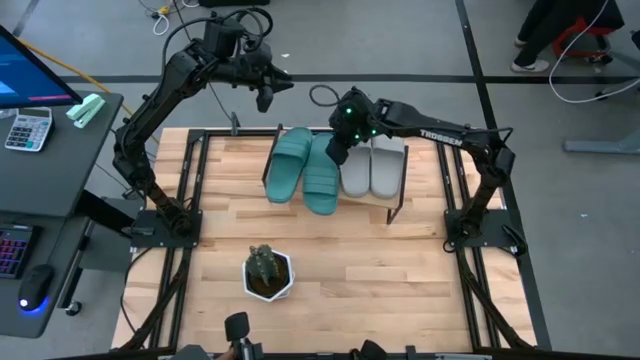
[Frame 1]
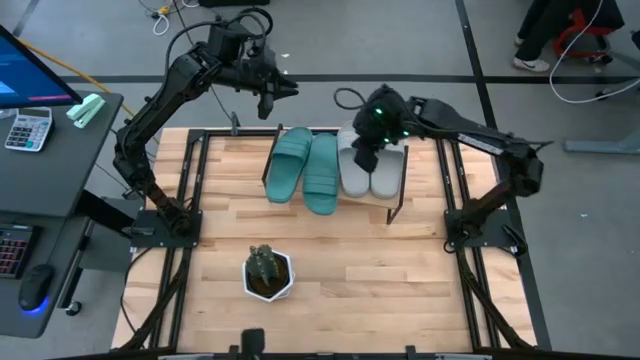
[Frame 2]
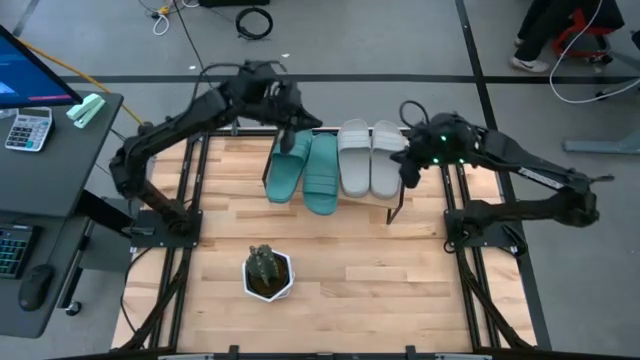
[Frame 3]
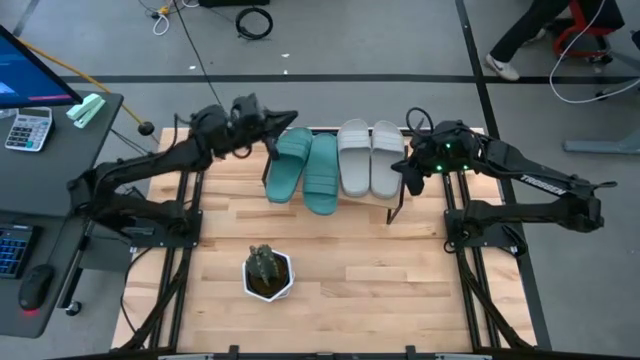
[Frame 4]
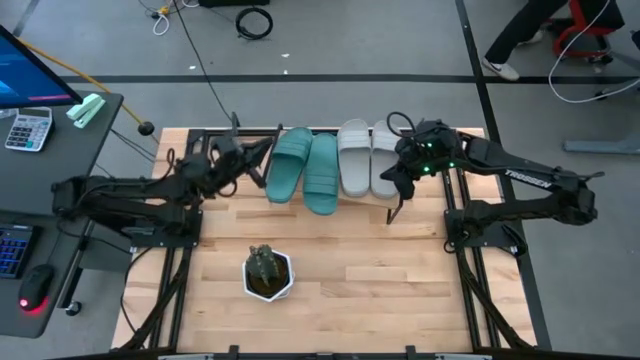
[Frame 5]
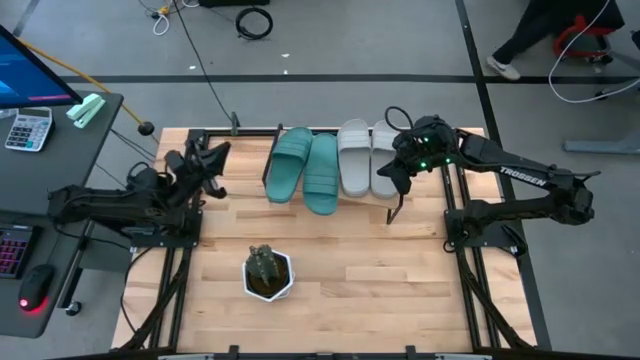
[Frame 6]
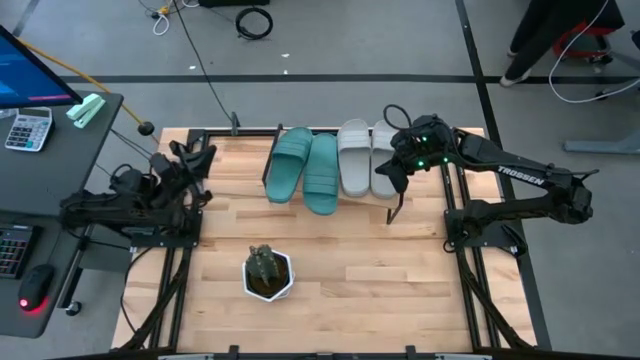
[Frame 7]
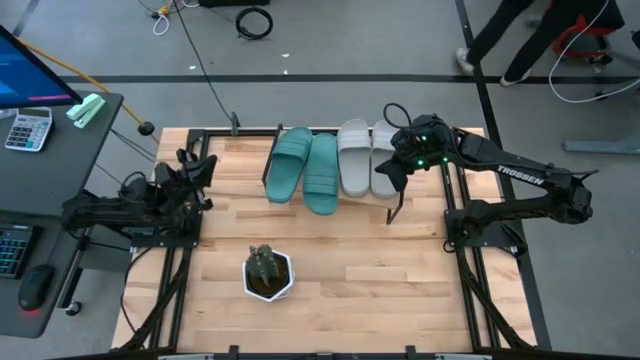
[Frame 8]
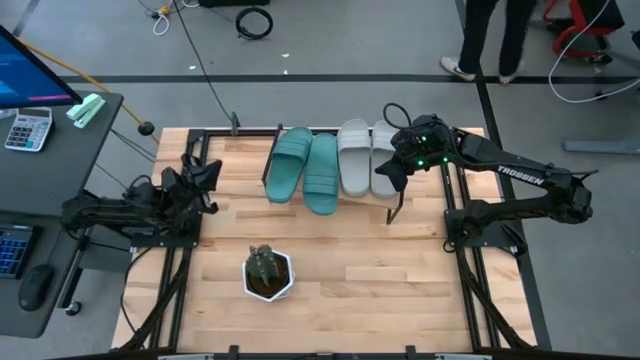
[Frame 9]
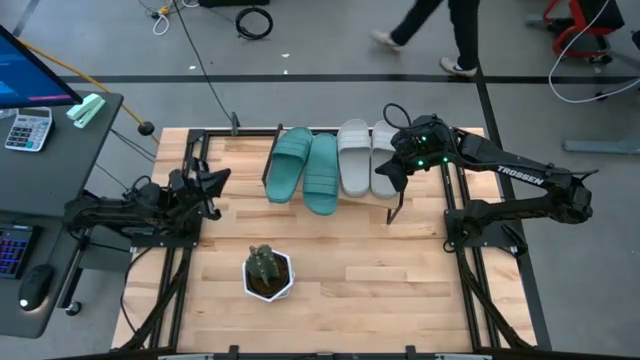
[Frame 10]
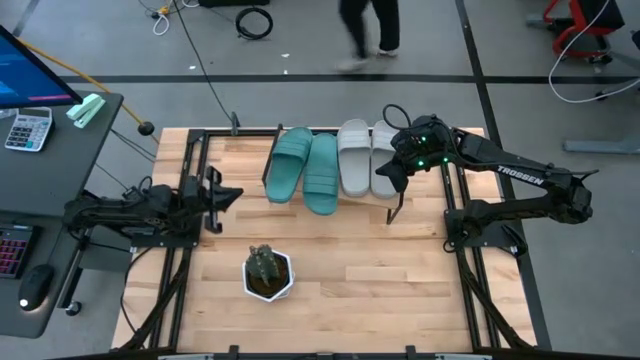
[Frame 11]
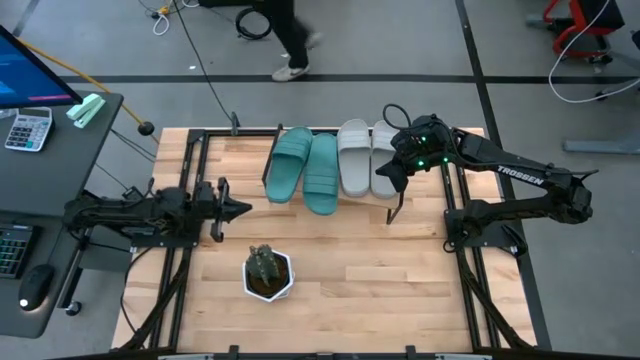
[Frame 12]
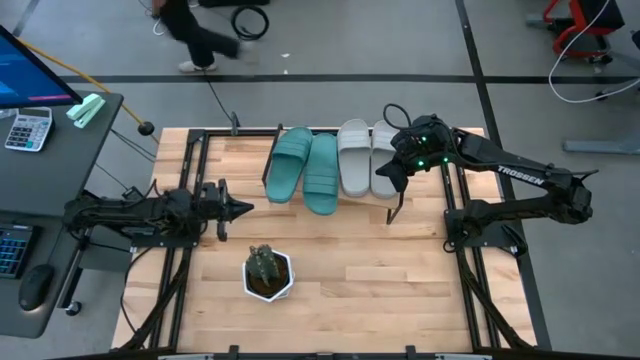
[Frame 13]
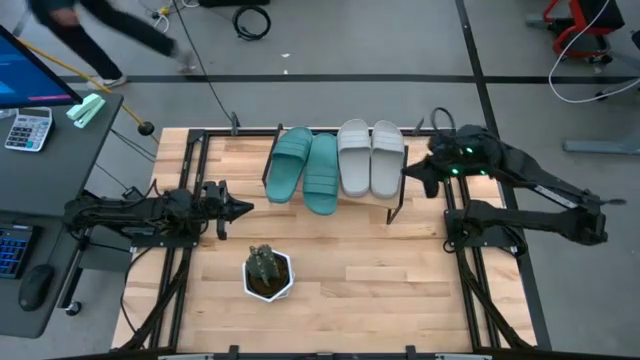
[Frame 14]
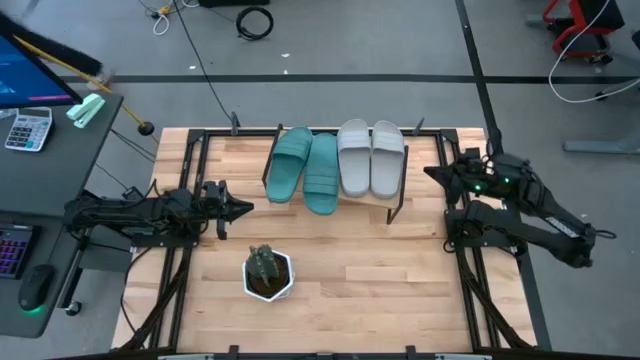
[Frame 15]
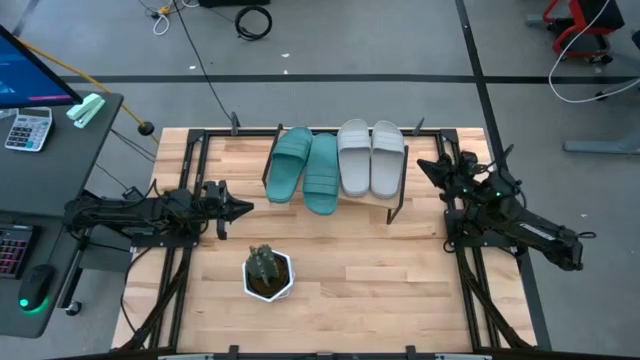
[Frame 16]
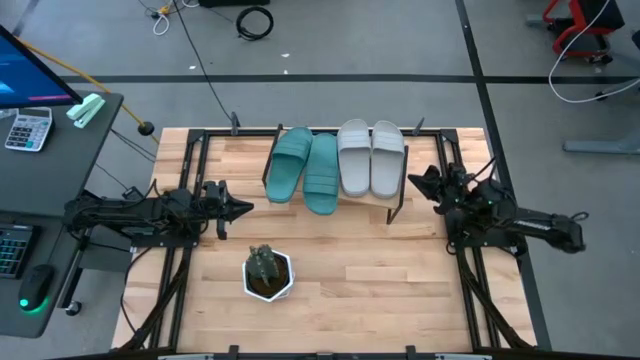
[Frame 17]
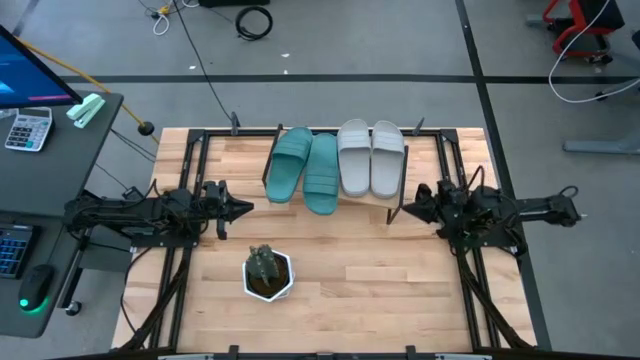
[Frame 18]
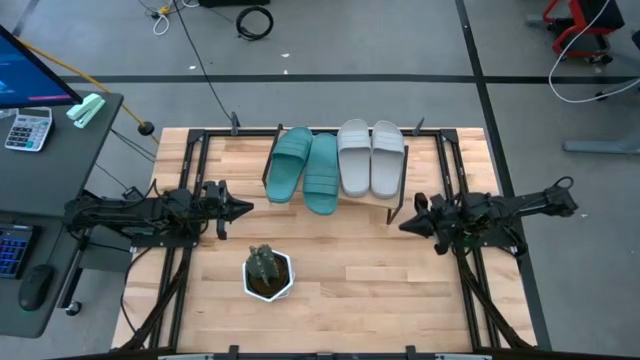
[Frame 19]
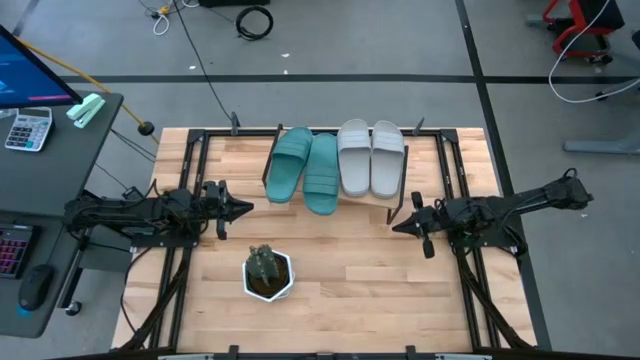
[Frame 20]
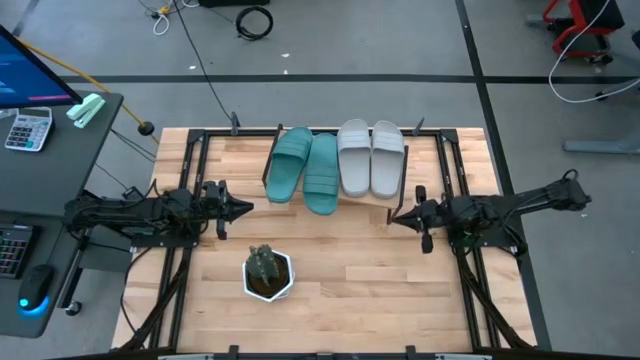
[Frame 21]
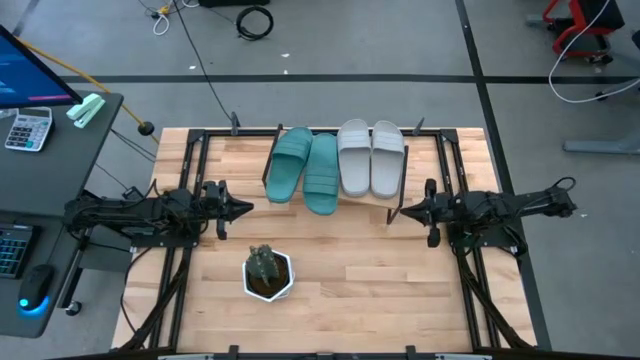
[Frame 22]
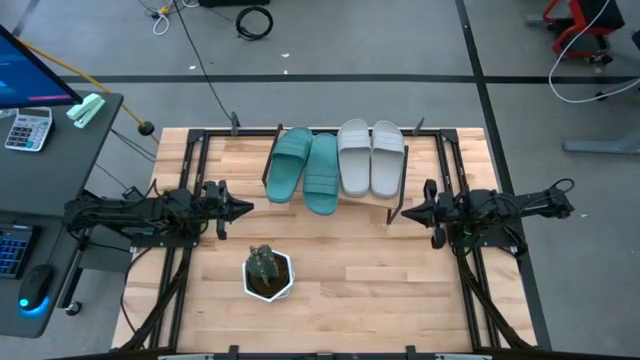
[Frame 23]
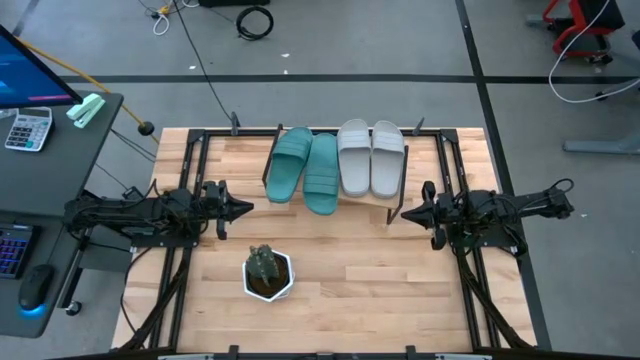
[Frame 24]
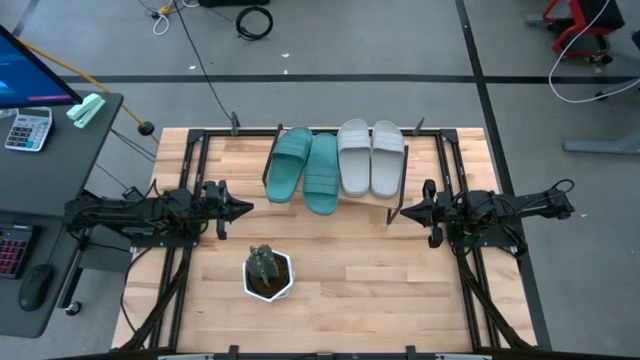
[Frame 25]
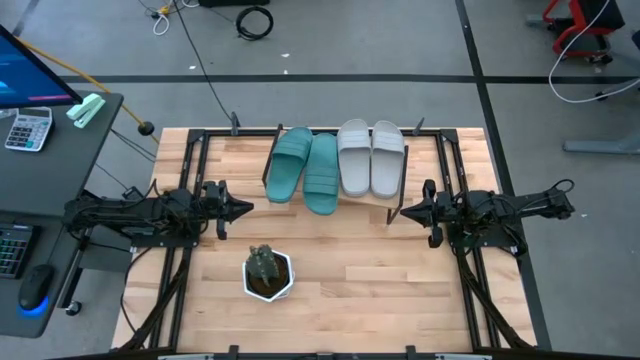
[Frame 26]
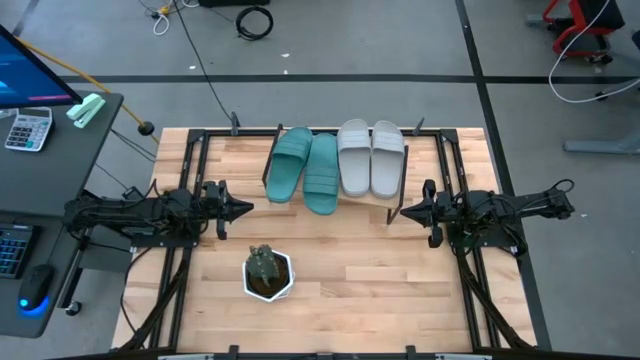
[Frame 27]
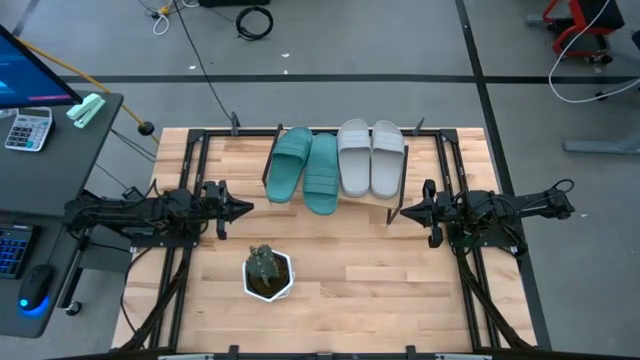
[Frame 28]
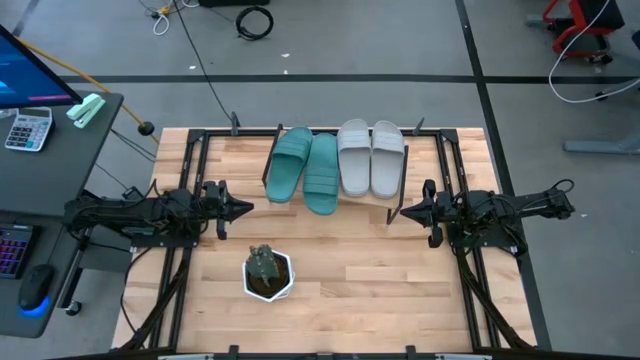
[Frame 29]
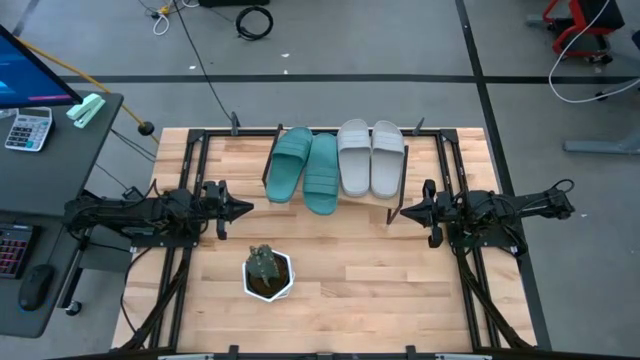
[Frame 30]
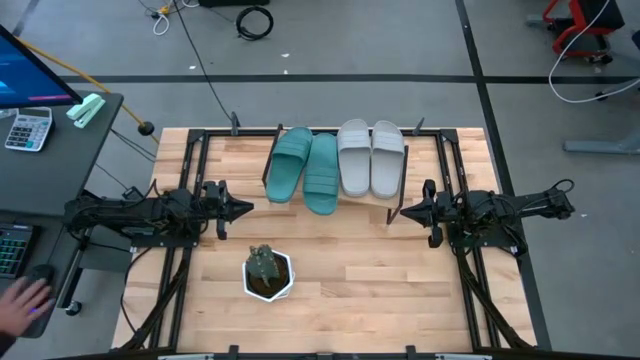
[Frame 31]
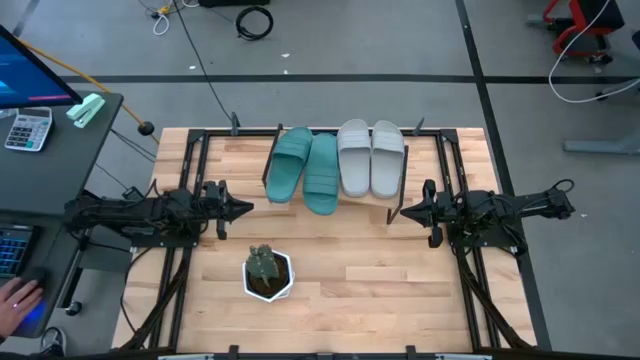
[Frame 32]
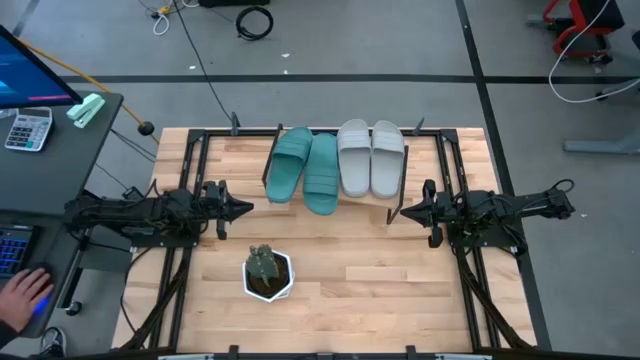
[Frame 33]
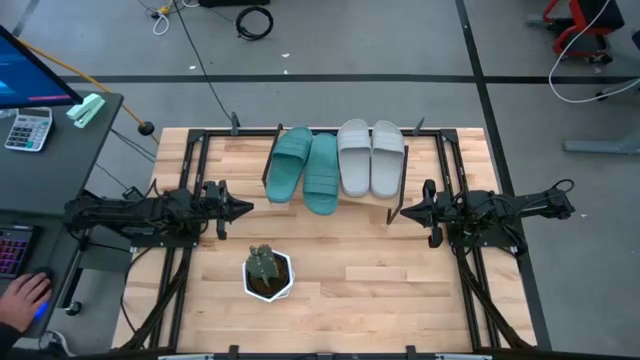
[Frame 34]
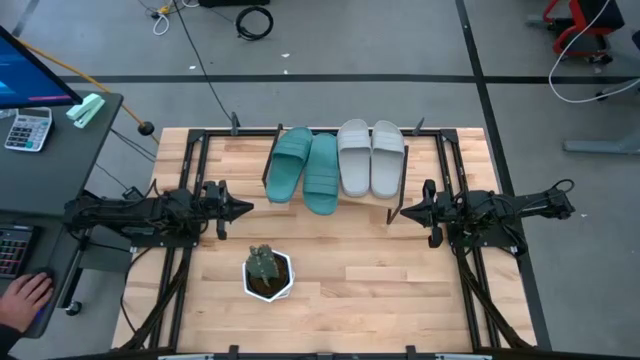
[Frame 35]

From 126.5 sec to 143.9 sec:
Task: Pick and place slides into the shelf
Return to Home Position
